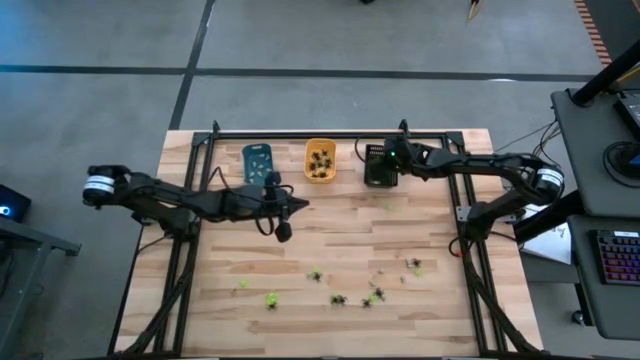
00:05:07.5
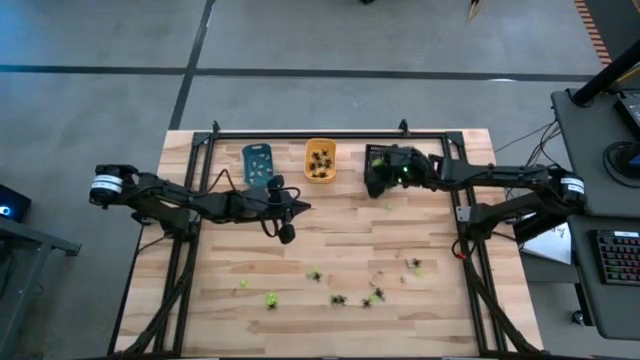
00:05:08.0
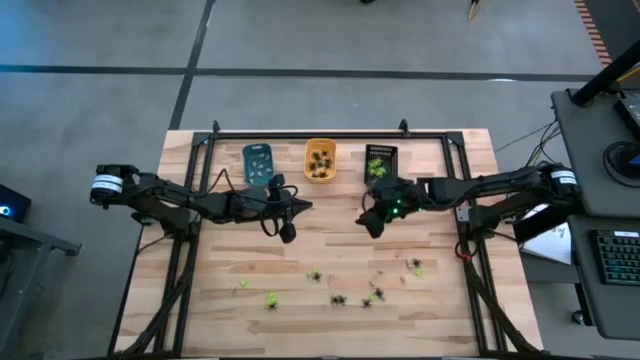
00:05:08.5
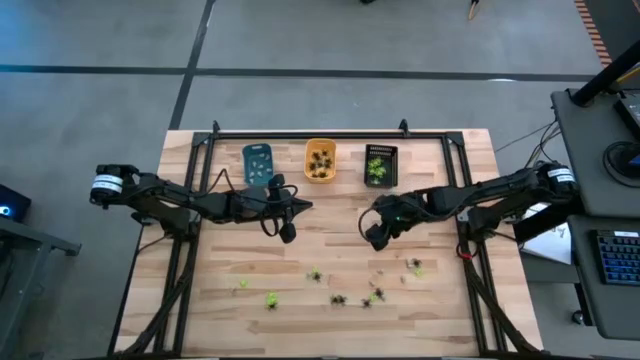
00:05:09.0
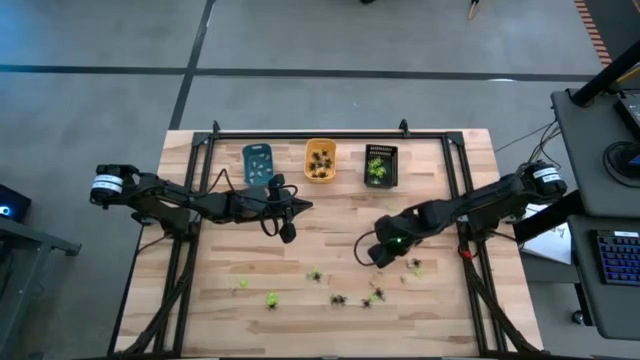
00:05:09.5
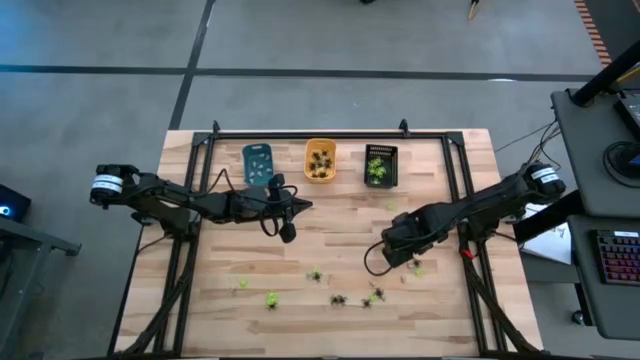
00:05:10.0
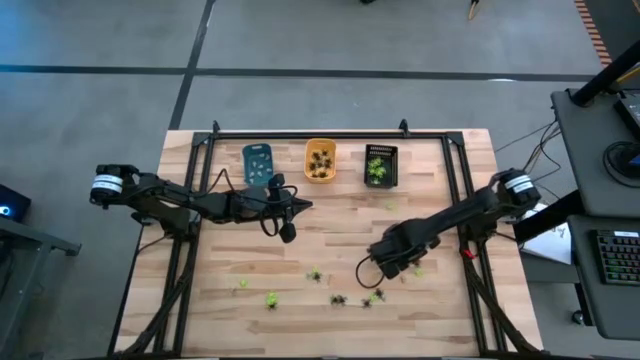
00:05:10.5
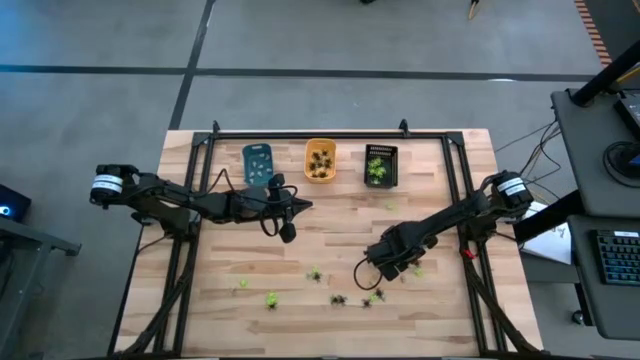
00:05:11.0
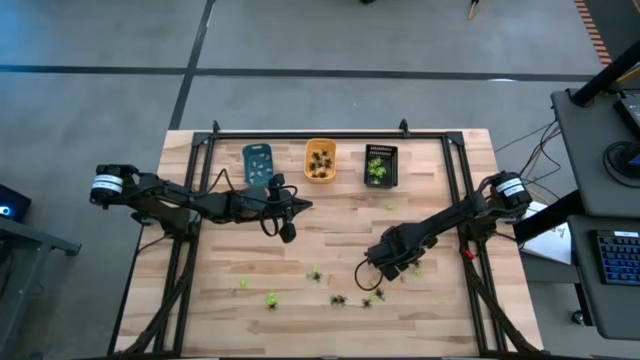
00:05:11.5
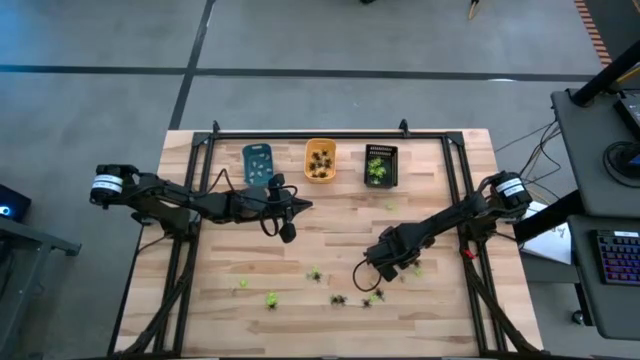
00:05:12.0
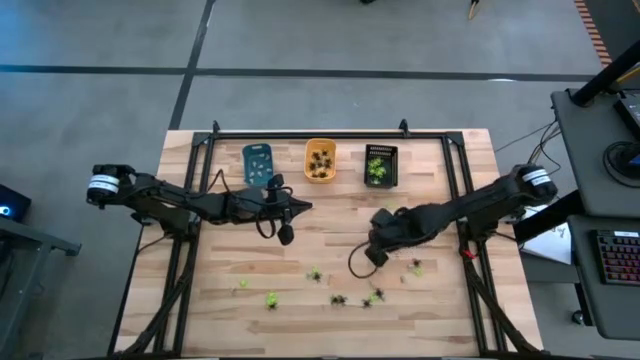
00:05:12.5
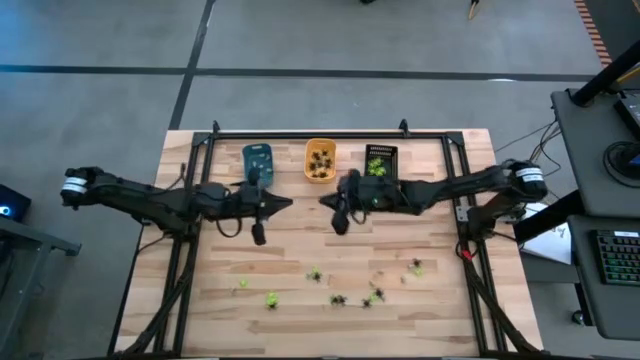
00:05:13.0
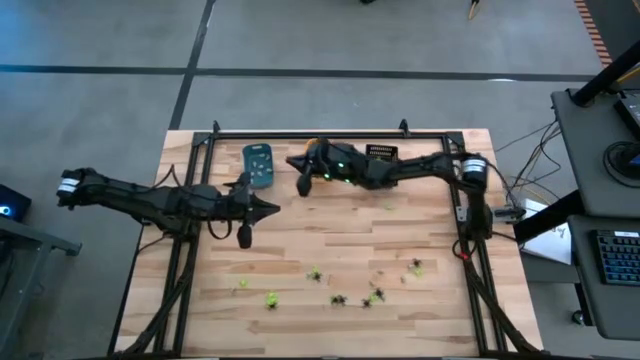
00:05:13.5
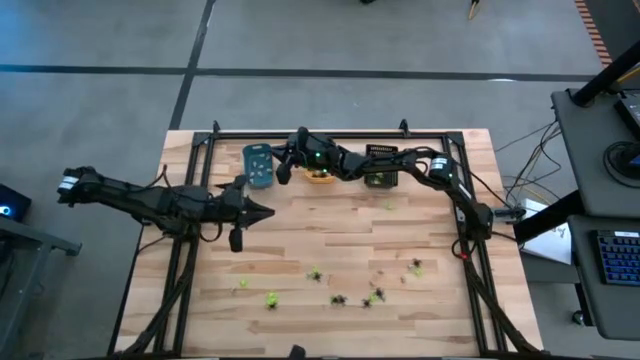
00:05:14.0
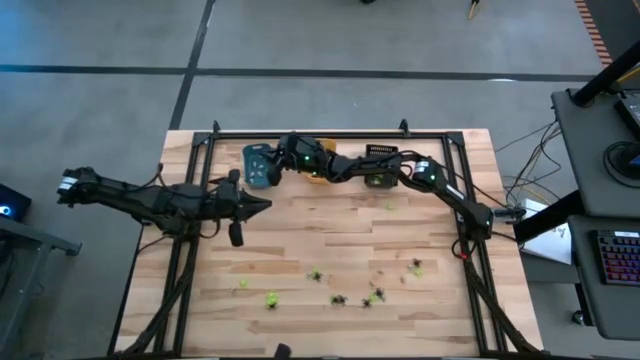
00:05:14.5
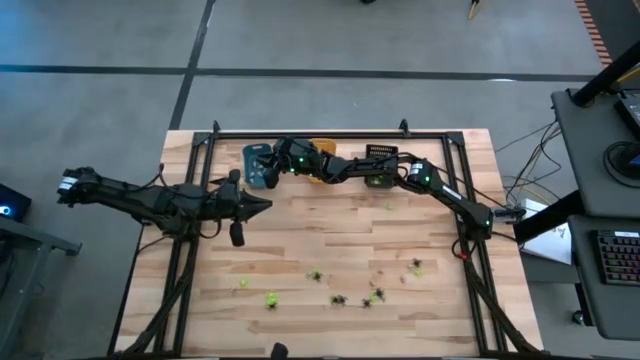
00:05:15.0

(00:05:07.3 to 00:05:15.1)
Task: Sort Halloween decoration
Put the white skull toy into the blue bin

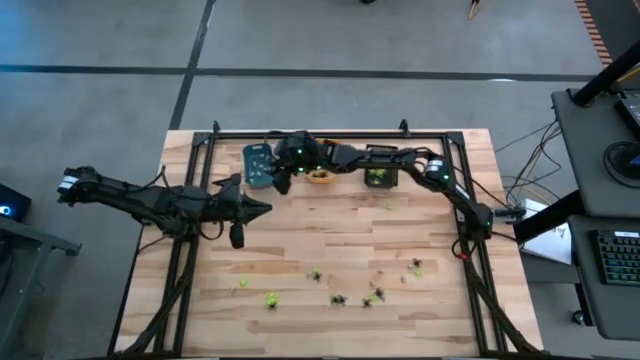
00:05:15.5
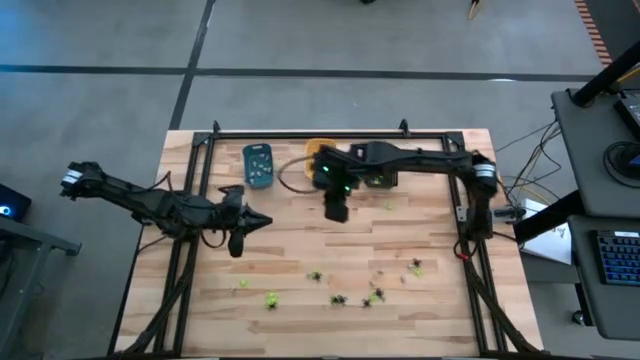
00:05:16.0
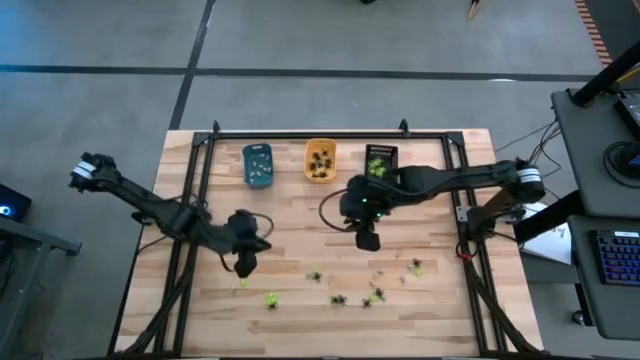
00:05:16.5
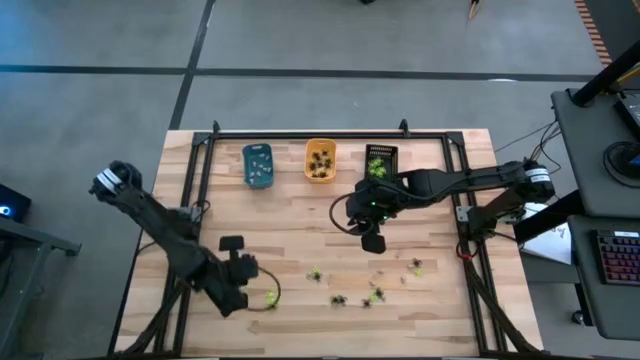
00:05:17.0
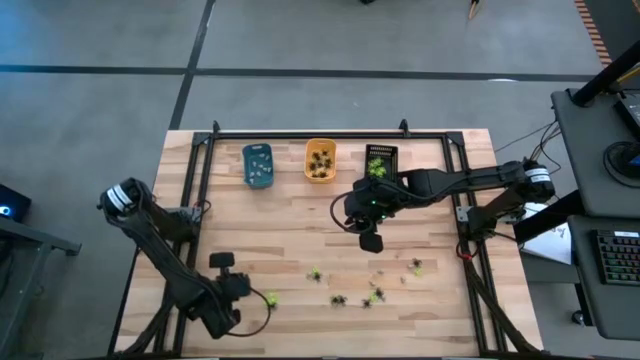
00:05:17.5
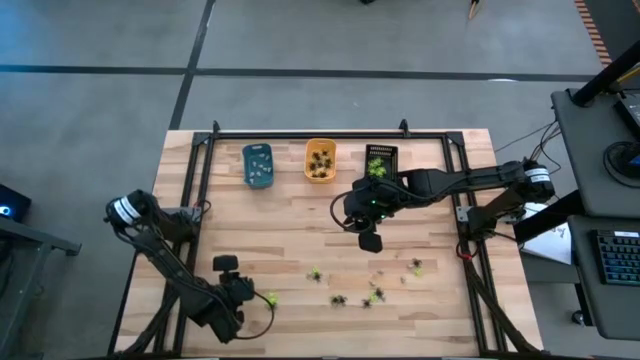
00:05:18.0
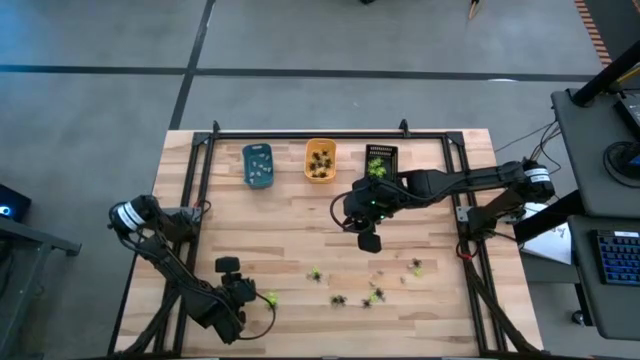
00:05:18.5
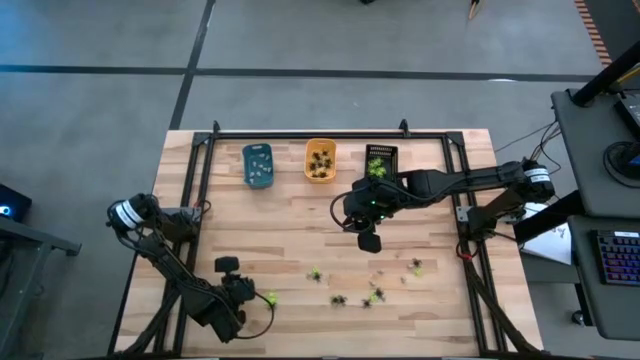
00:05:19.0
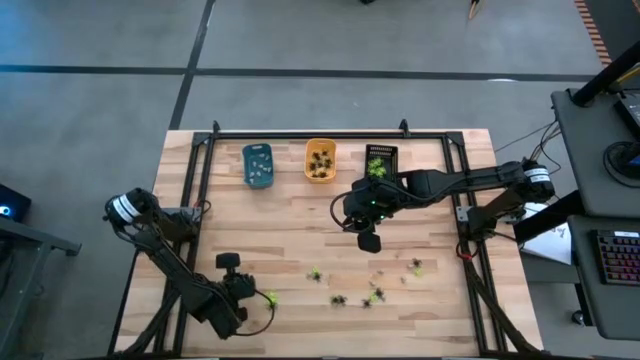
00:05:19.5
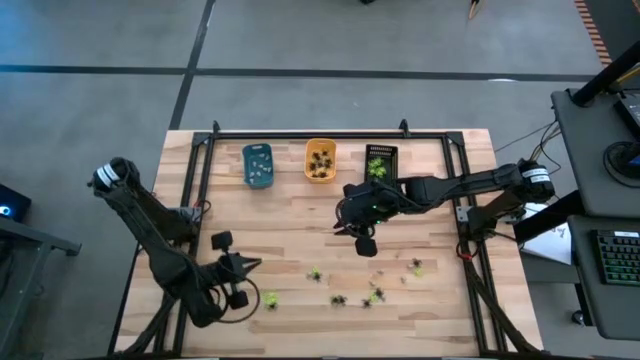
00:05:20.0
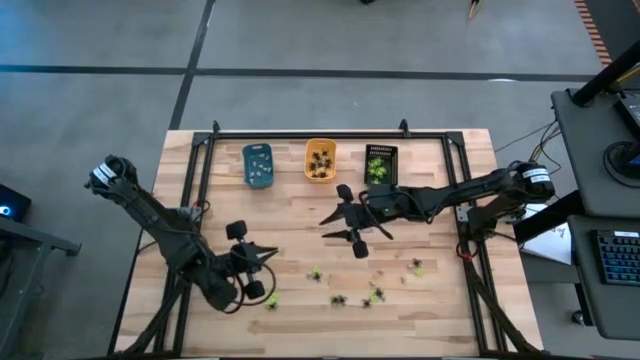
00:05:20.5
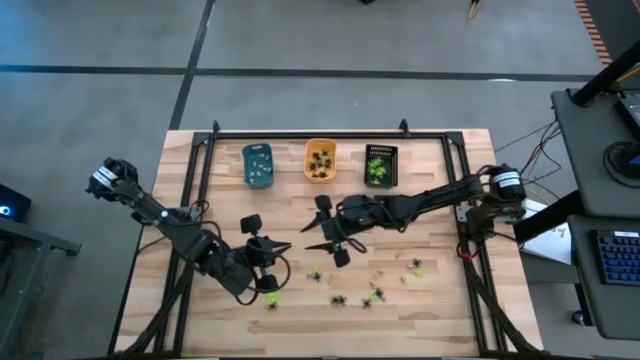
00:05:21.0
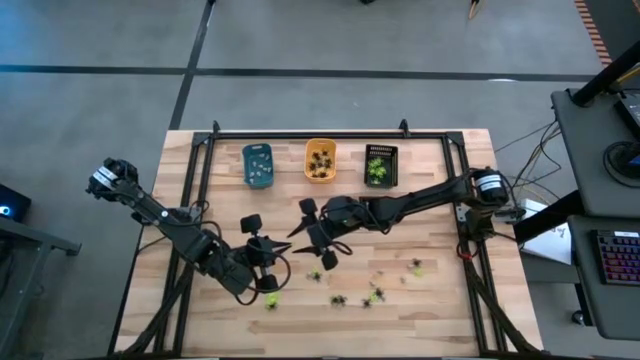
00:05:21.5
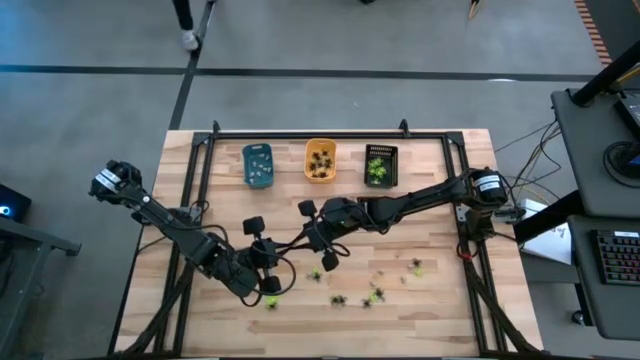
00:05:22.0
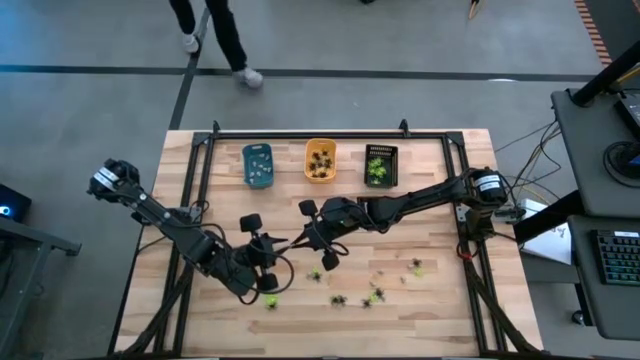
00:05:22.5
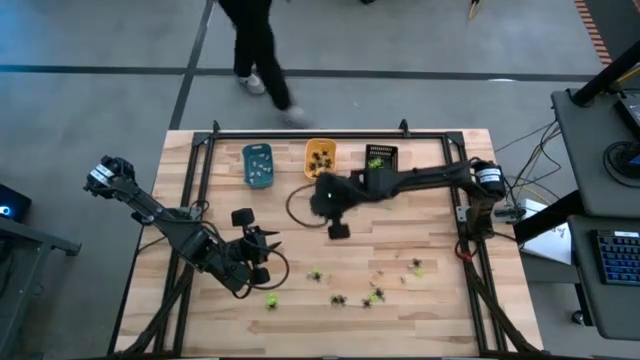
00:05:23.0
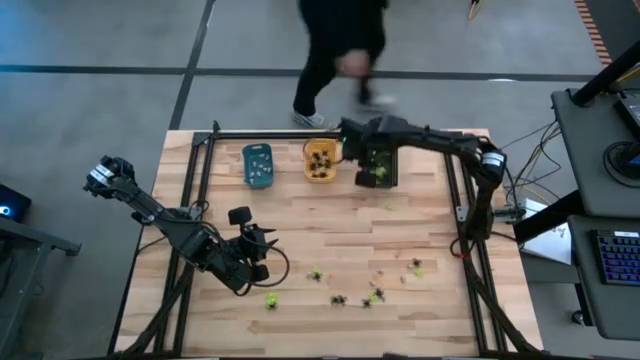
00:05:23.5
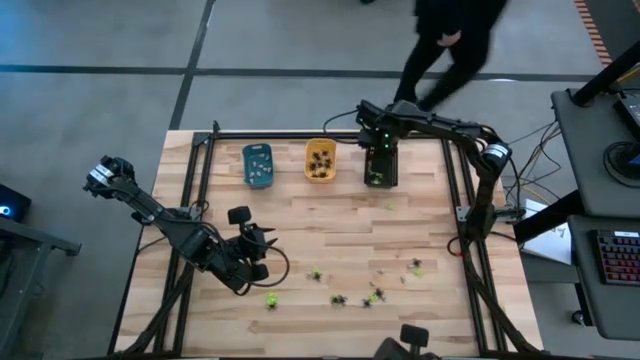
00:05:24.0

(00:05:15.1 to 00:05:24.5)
Put the green spider toy into the black bin

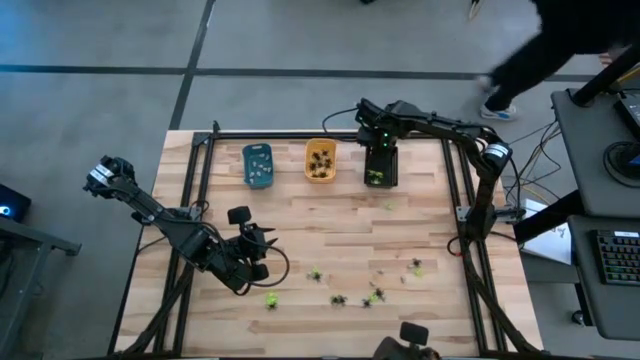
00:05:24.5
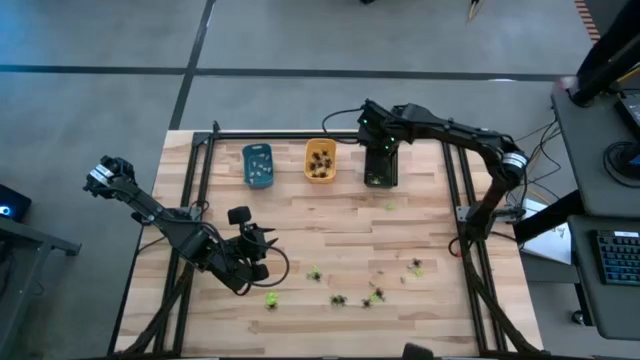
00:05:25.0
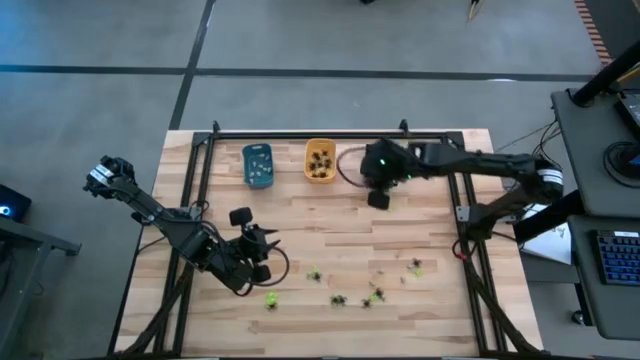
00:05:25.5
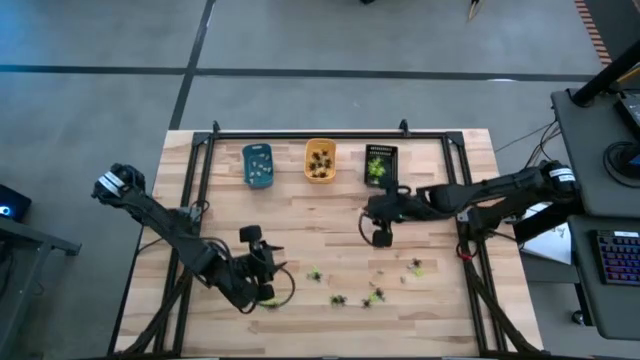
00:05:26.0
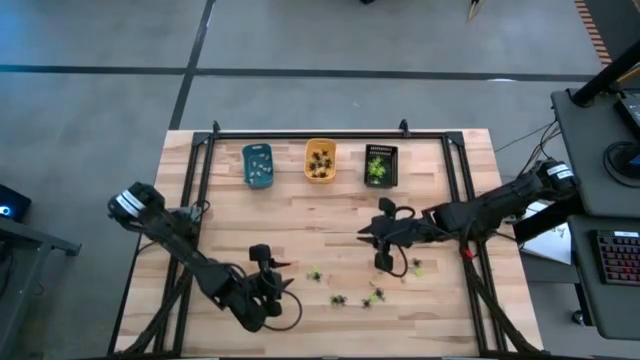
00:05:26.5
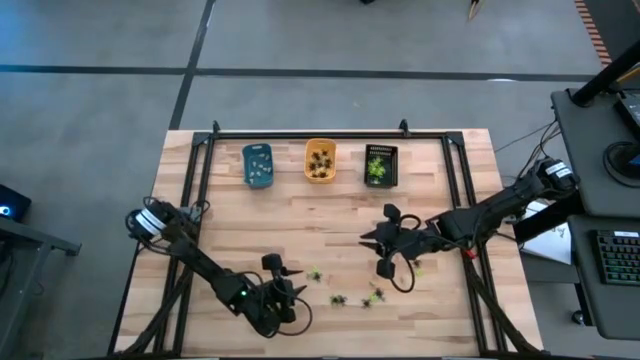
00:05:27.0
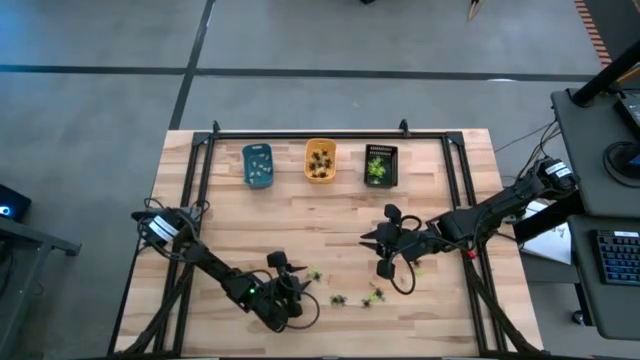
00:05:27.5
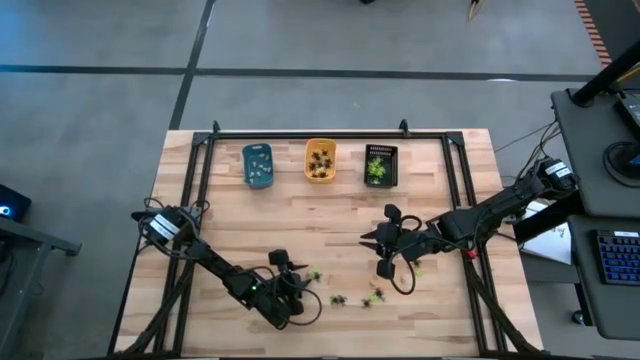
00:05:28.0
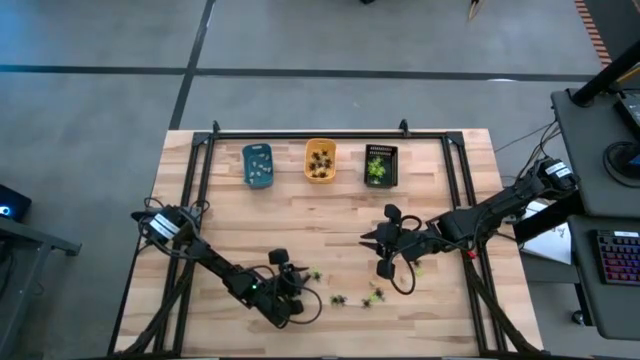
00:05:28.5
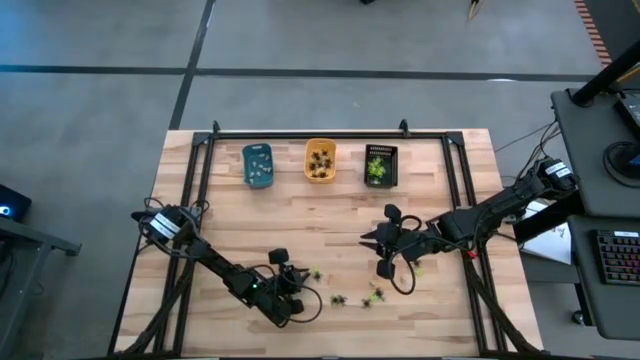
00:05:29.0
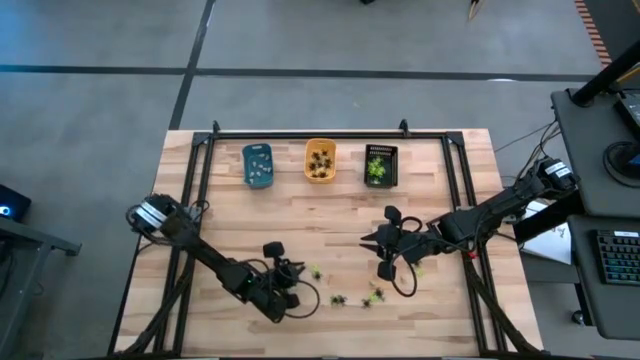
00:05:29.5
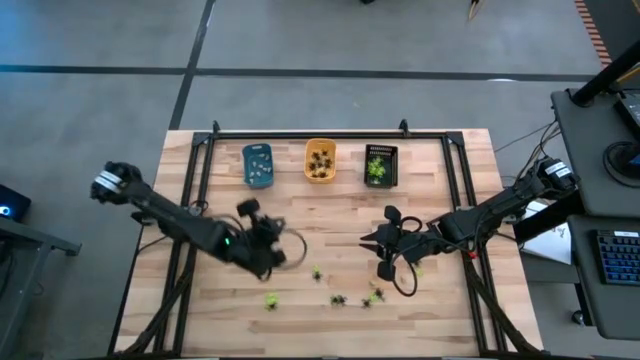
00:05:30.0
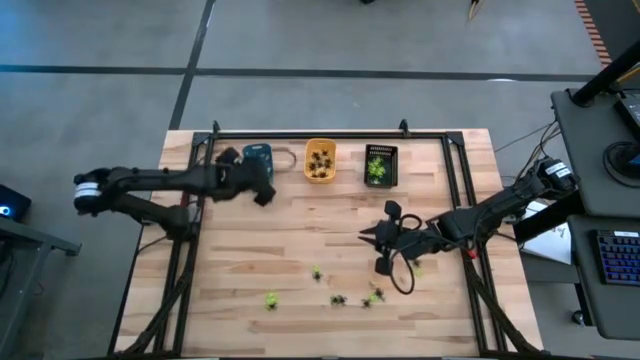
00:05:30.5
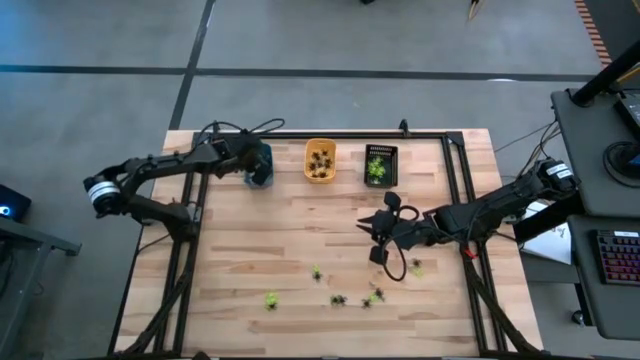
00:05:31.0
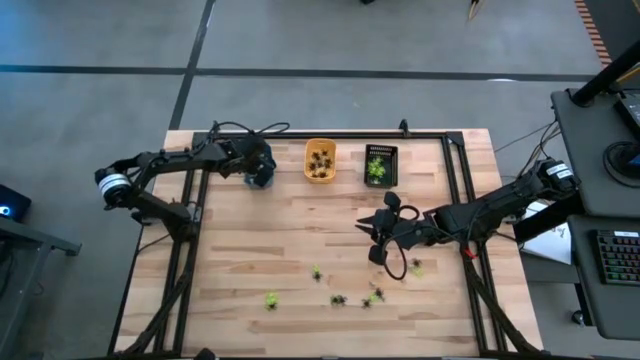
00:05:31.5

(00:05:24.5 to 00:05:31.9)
Put the white skull toy into the blue bin
